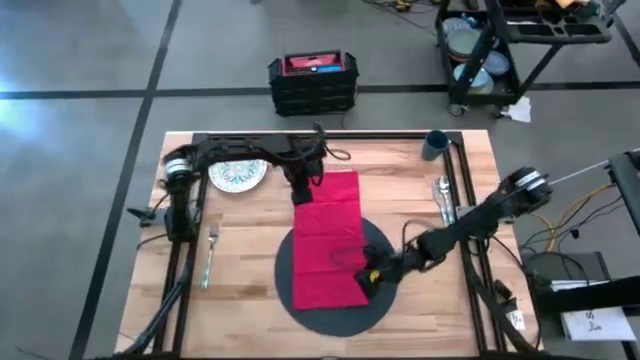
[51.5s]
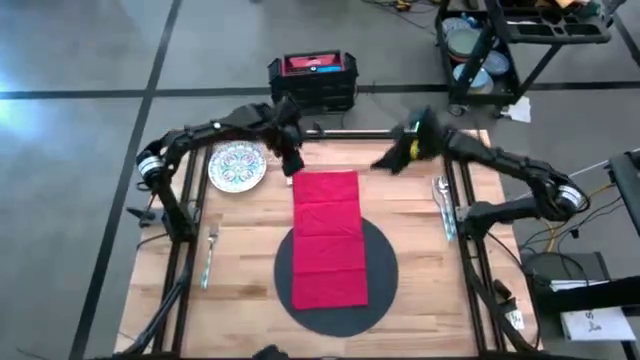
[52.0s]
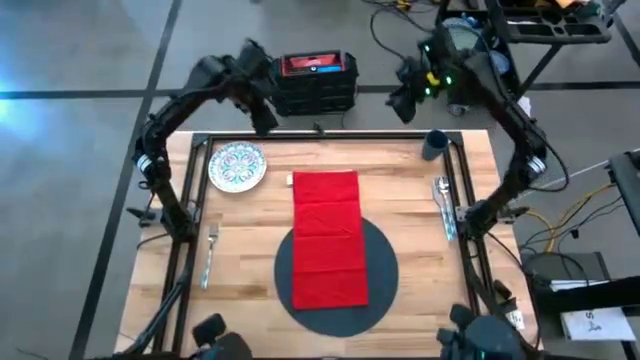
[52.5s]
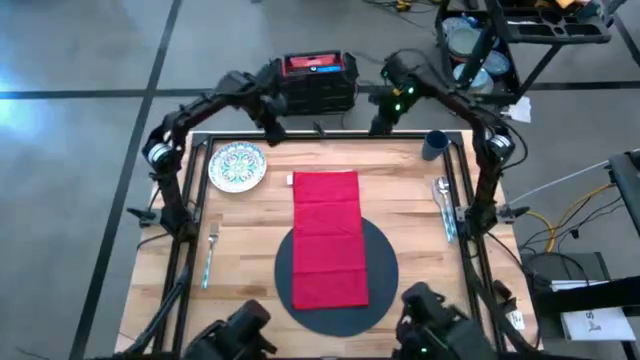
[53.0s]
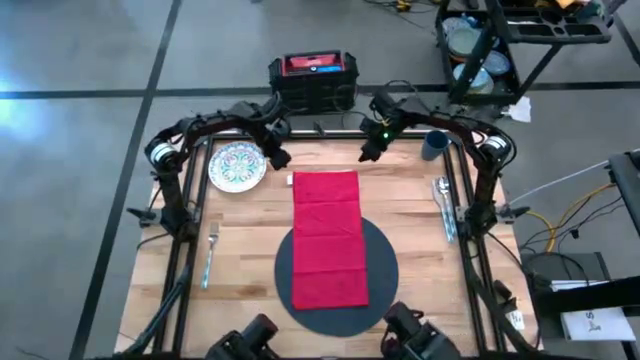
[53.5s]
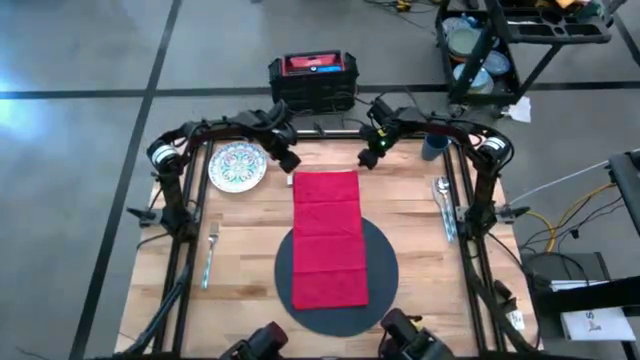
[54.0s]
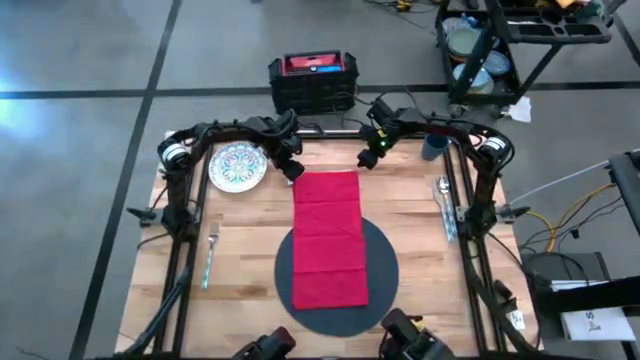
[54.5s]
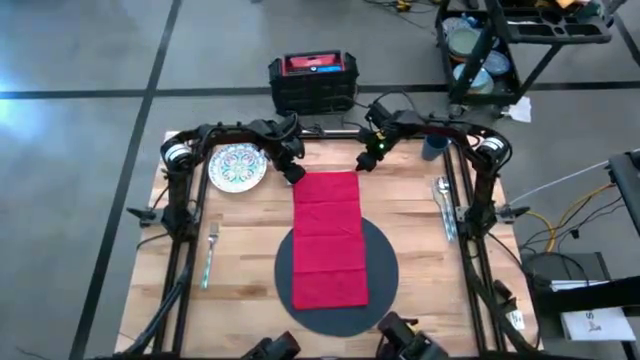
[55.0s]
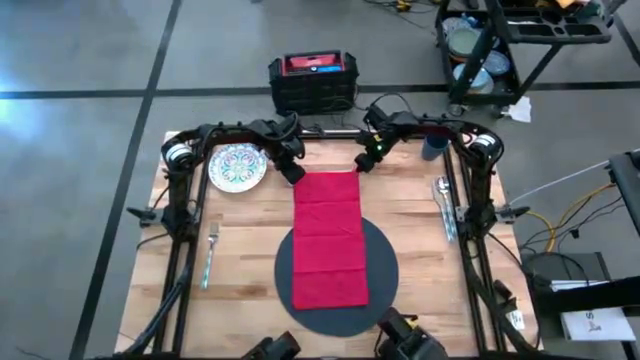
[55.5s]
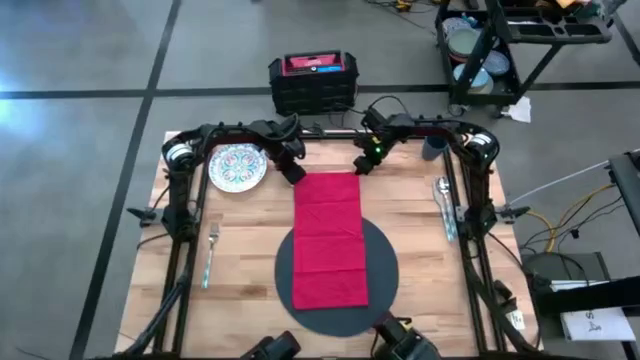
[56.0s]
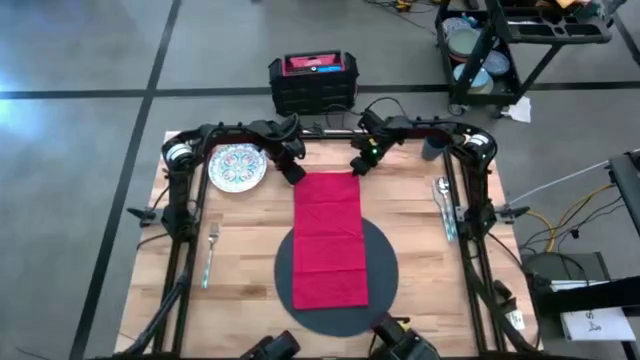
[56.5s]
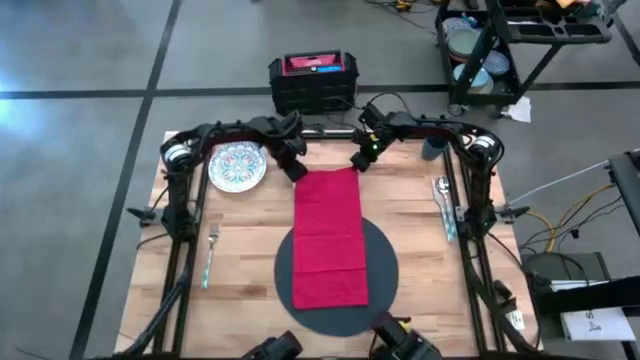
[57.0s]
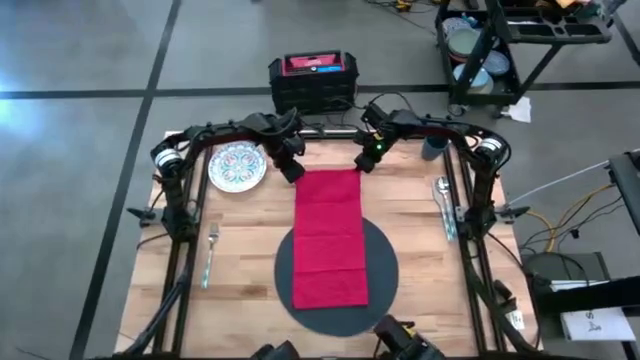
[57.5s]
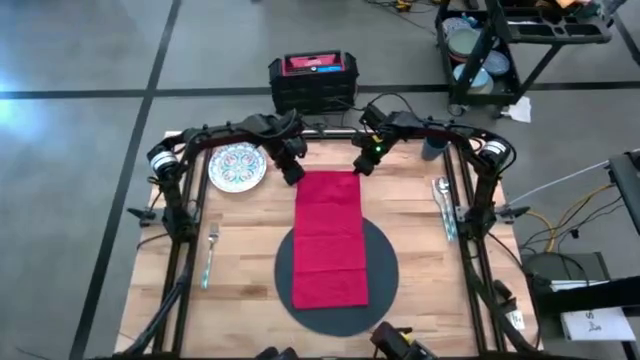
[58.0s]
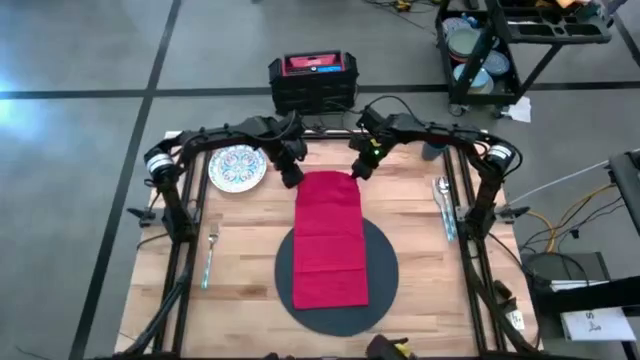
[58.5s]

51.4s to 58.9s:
Task: Set table place
Fold the red napkin on the table

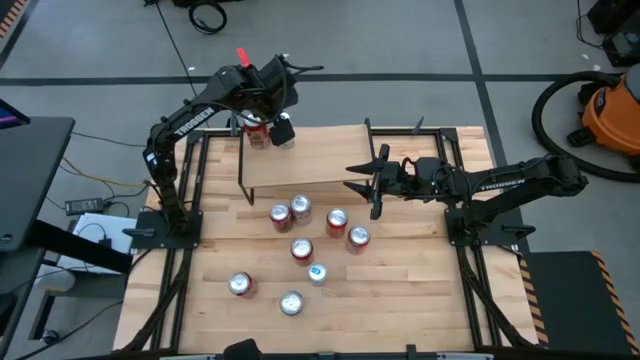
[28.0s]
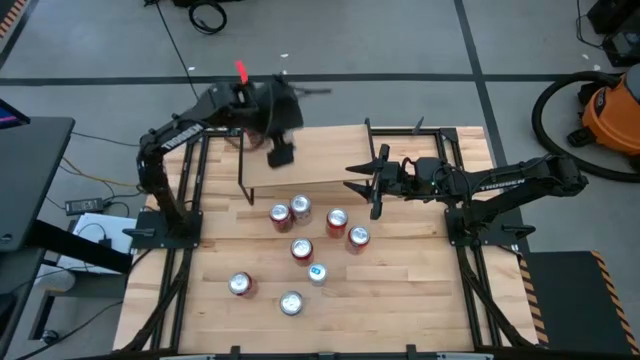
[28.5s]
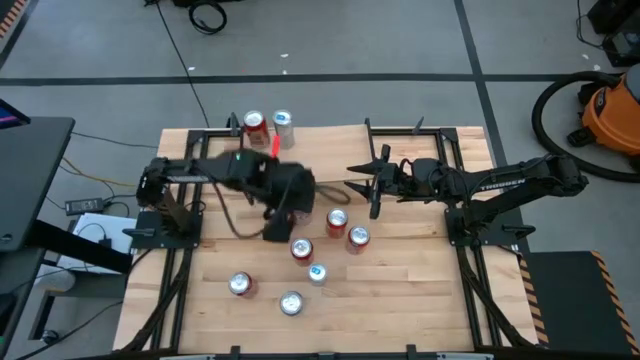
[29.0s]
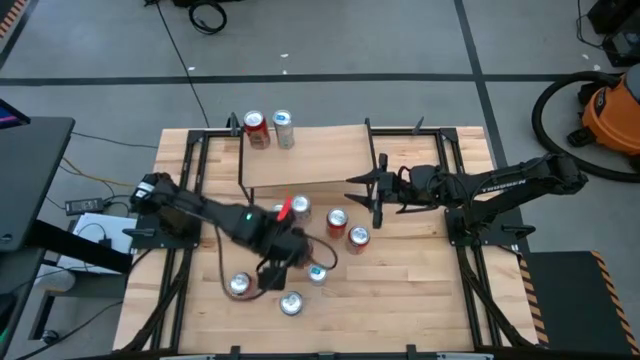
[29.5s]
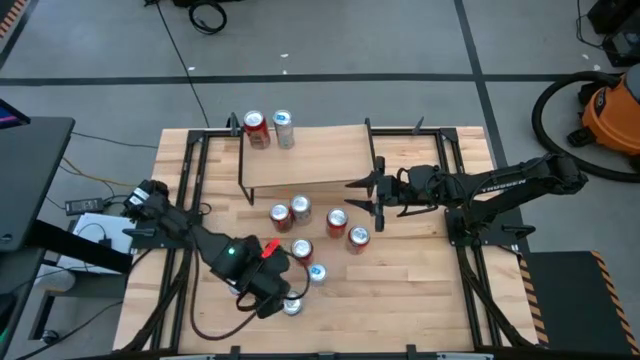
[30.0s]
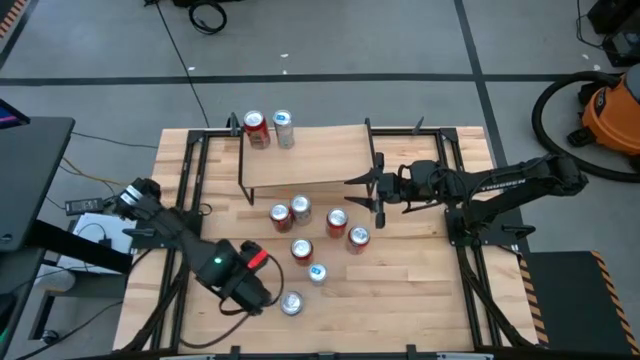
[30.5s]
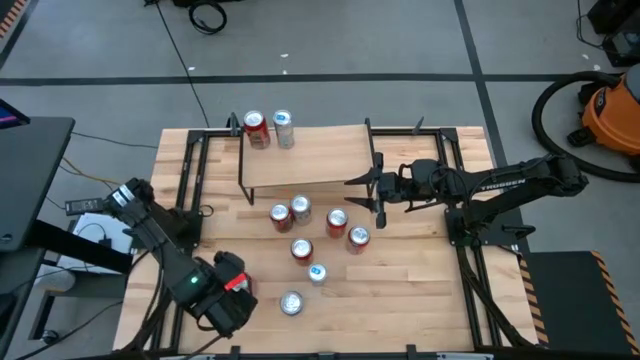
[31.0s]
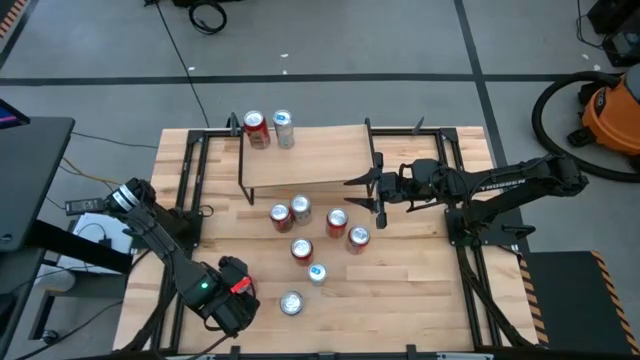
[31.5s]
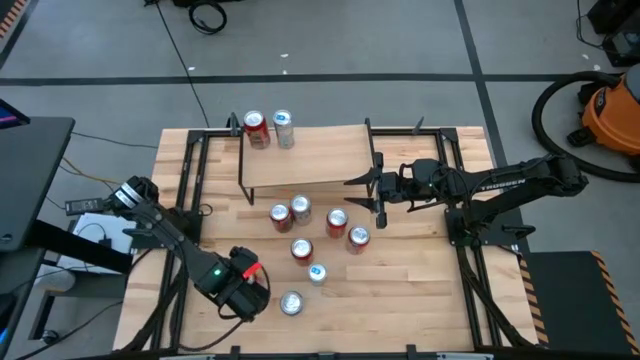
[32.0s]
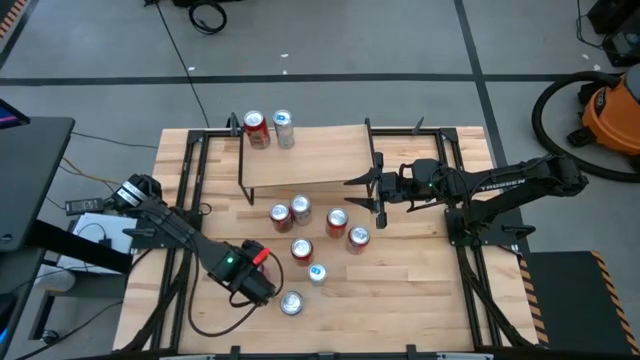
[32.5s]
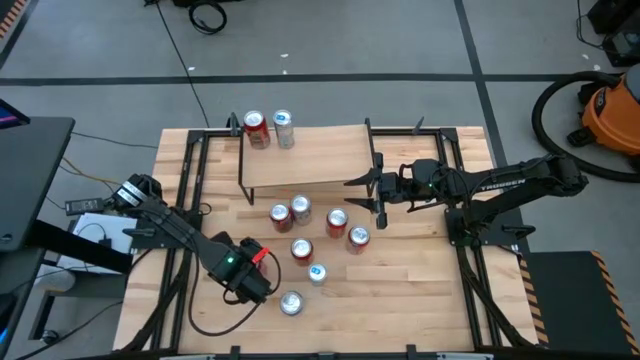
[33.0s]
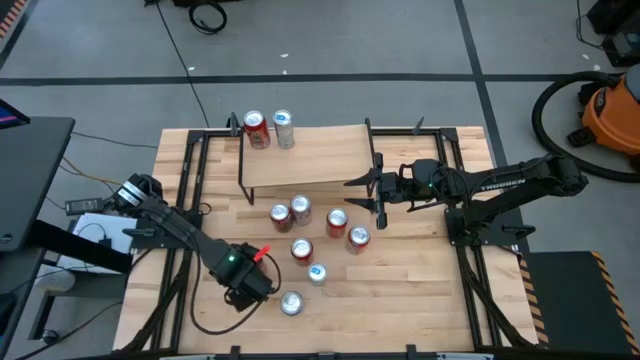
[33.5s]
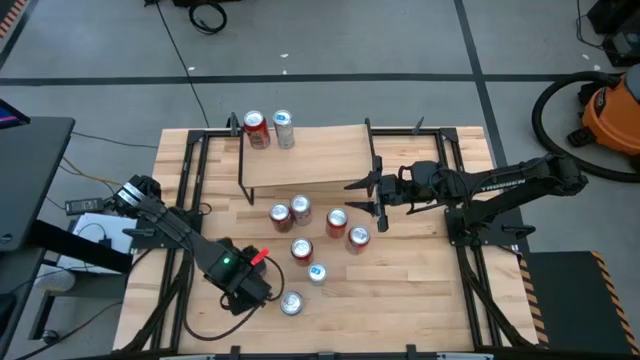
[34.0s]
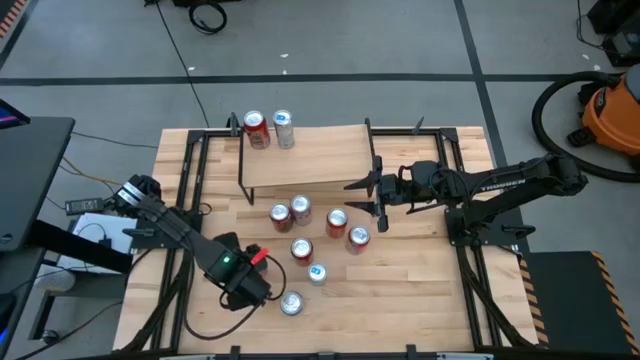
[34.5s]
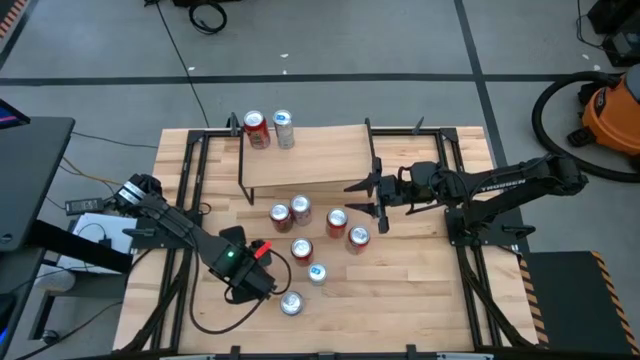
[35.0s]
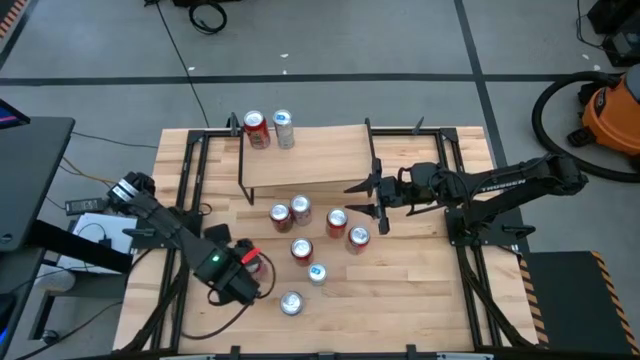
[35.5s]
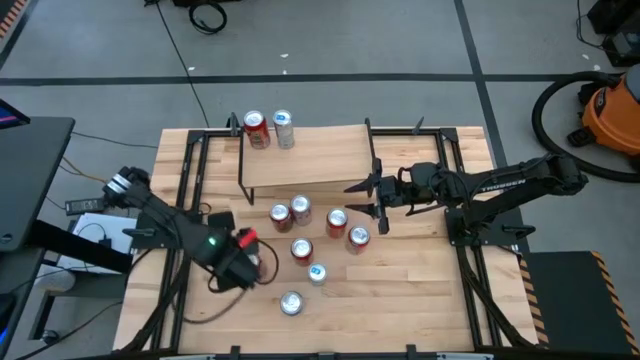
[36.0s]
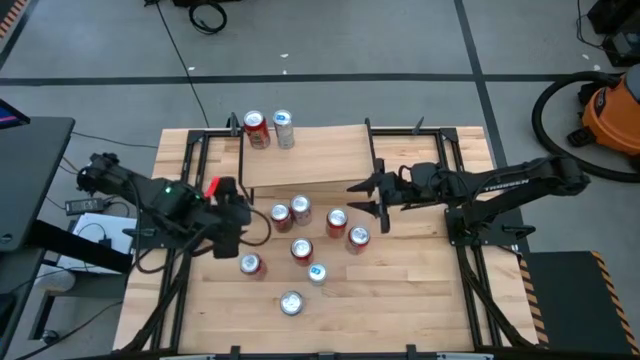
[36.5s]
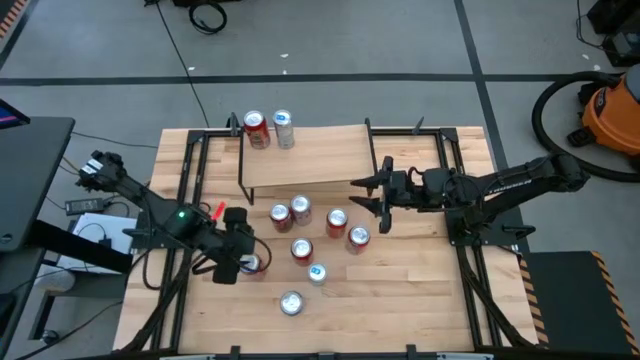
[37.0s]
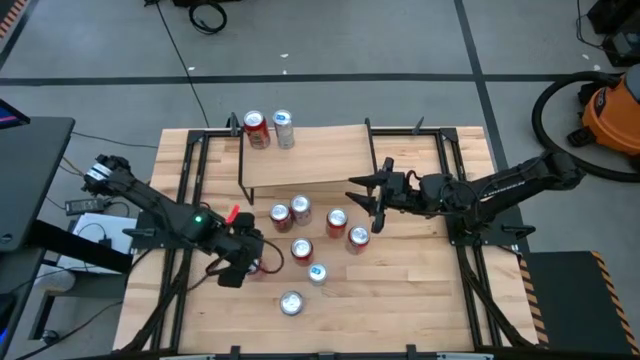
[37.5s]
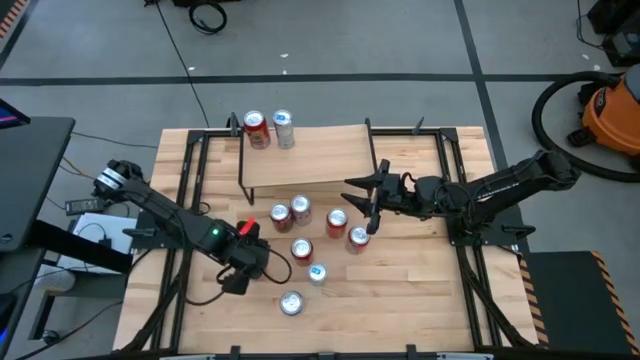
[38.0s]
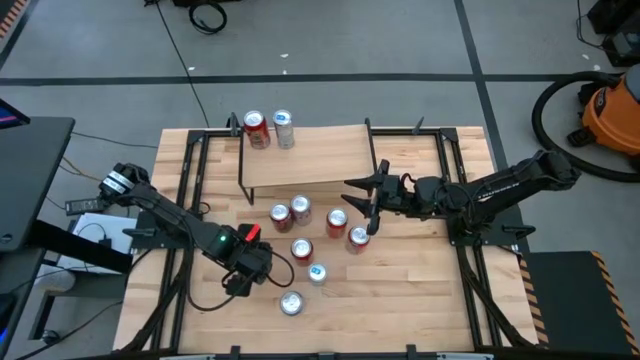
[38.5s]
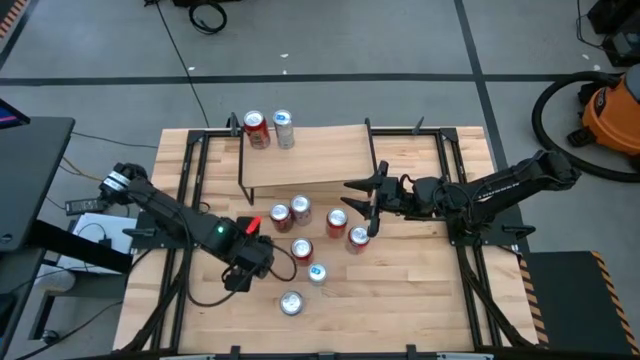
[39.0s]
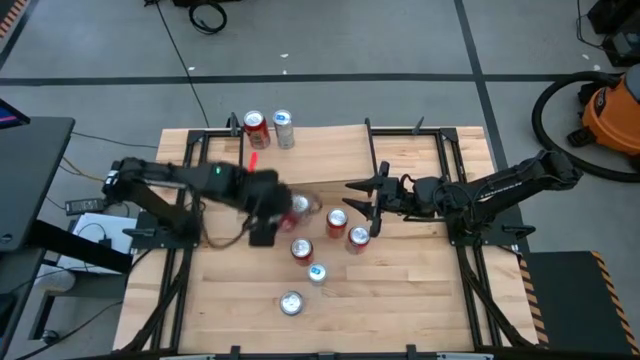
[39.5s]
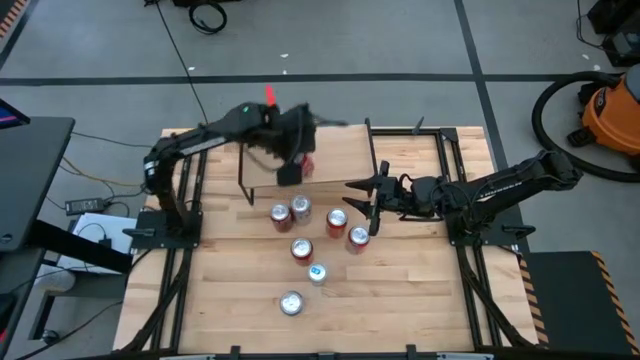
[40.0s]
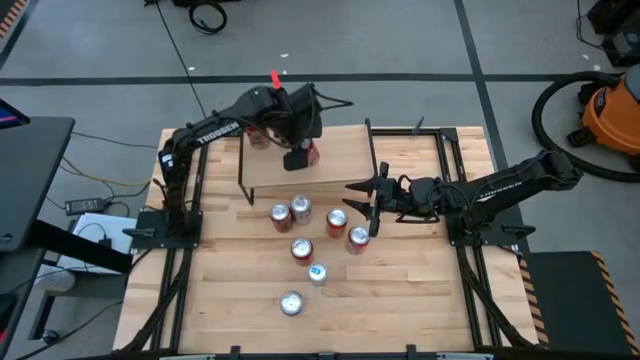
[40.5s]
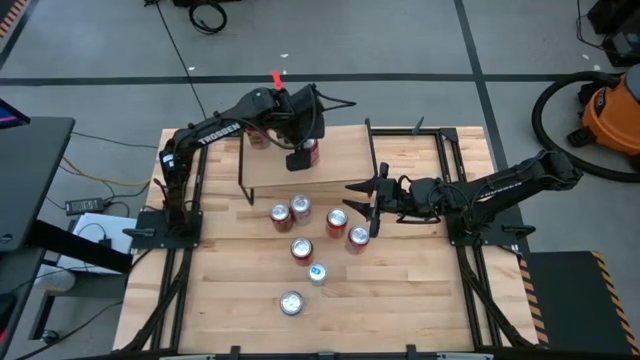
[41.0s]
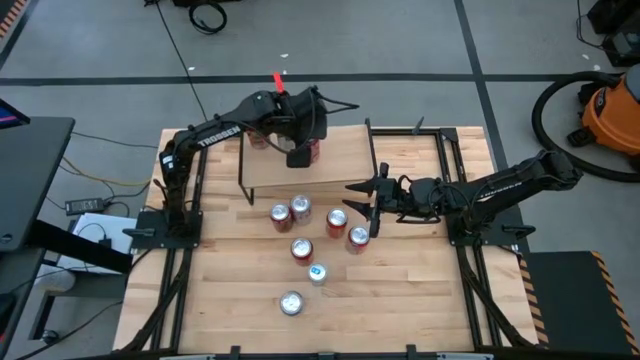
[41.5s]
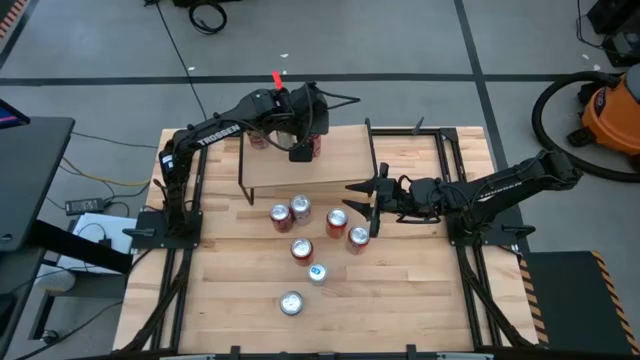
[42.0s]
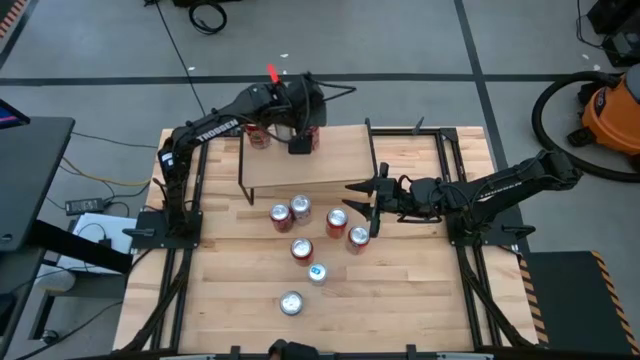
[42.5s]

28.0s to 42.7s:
Task: Place canned beverage on shelf
Put the red black soda can on the shelf
